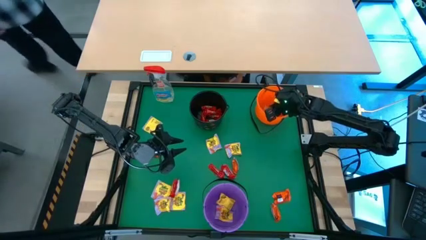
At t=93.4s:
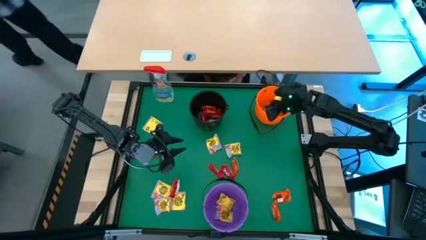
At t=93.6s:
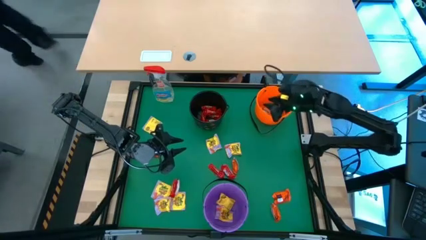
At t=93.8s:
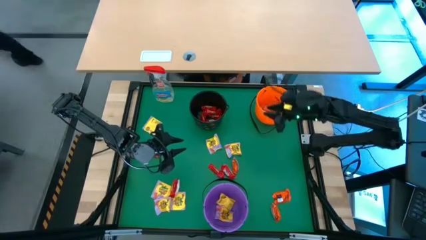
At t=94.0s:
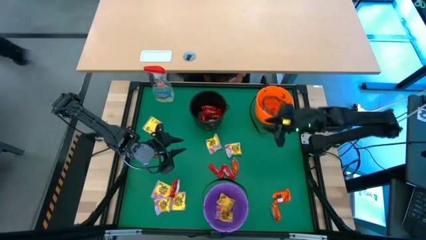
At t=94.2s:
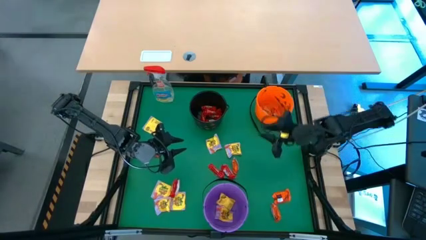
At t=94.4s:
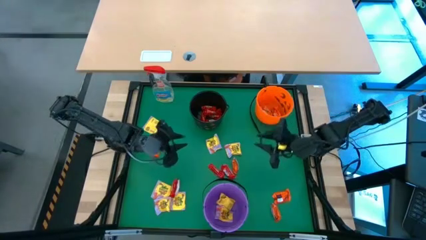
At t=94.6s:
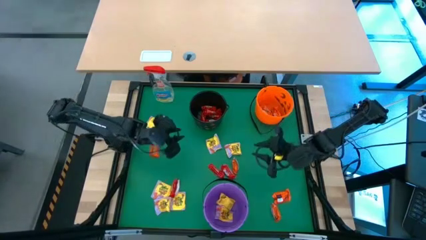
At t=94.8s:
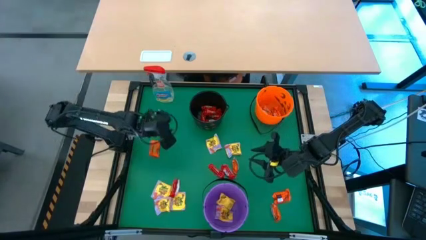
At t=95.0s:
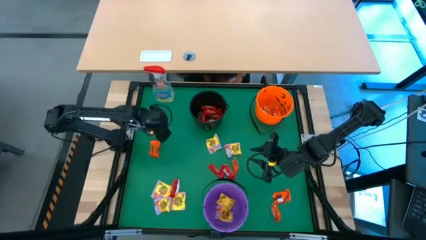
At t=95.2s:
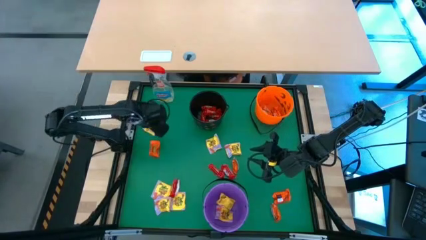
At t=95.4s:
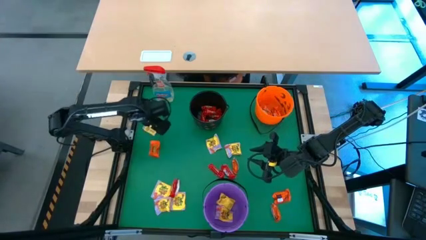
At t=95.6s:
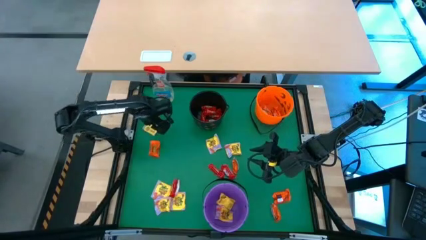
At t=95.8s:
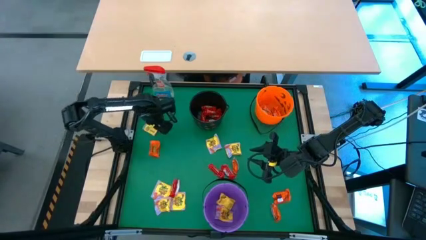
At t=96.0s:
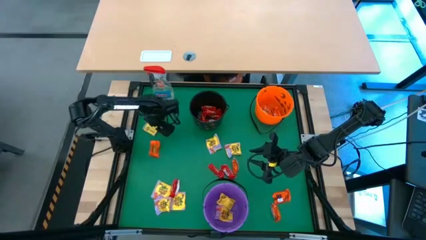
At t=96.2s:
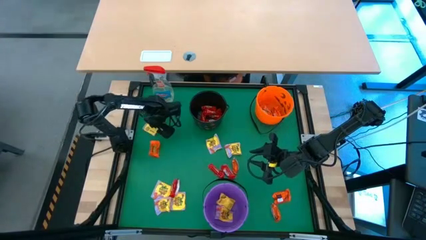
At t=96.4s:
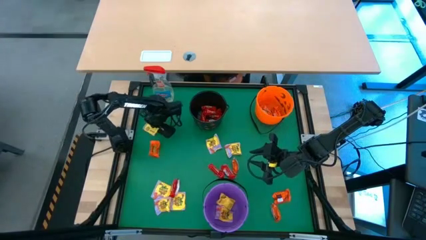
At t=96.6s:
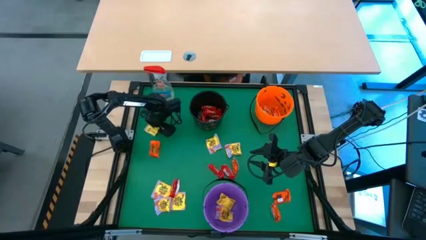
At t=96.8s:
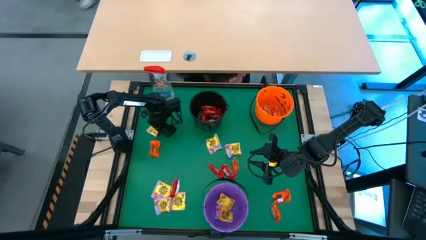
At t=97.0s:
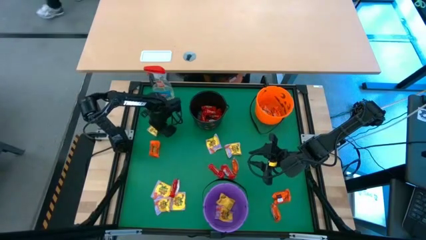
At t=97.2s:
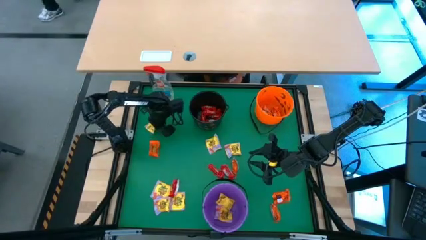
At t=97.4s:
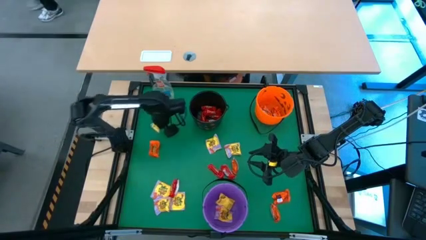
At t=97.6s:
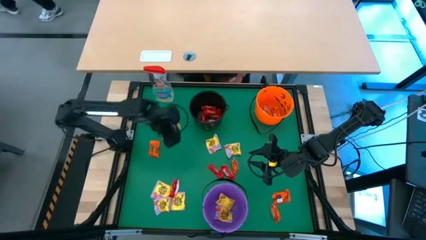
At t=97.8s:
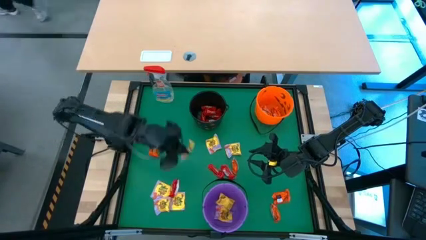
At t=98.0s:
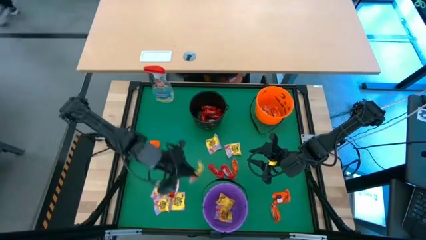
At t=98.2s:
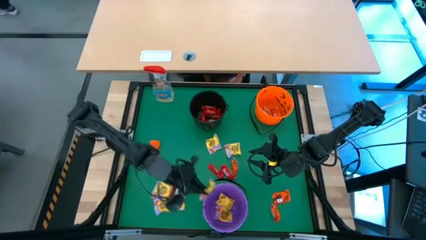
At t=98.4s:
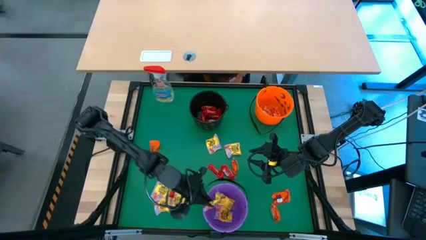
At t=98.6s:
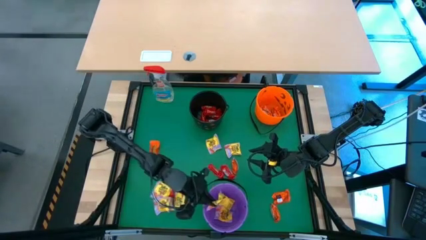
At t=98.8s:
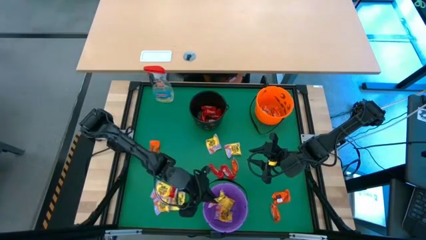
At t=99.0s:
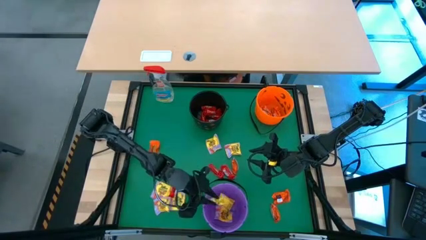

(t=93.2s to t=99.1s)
Task: Sort candy
Put the yellow candy into the violet bucket

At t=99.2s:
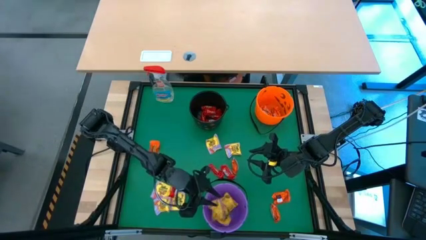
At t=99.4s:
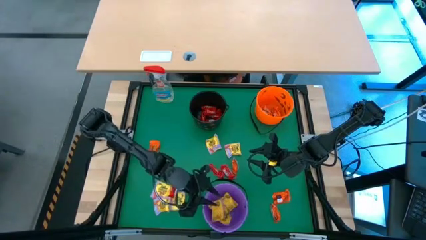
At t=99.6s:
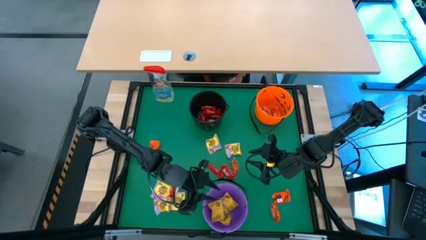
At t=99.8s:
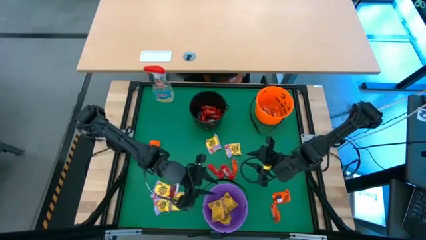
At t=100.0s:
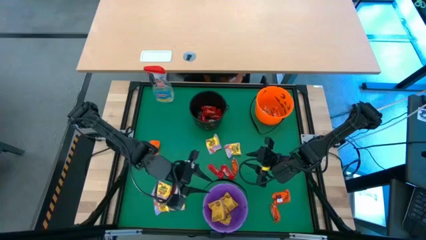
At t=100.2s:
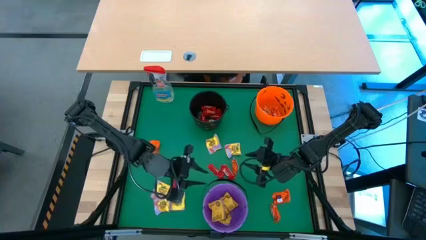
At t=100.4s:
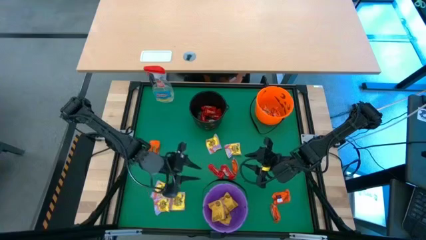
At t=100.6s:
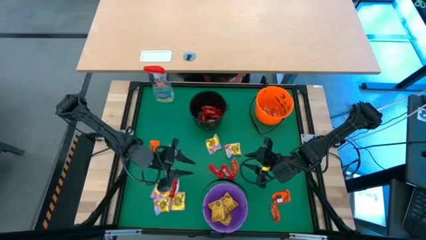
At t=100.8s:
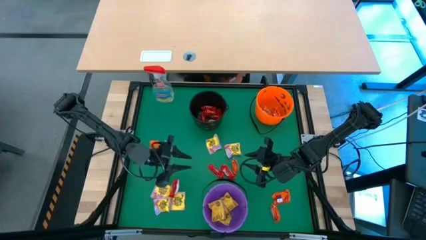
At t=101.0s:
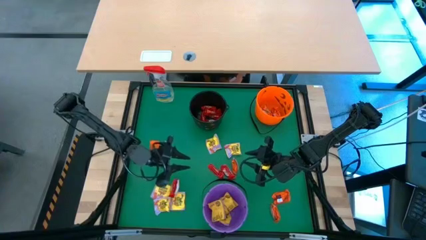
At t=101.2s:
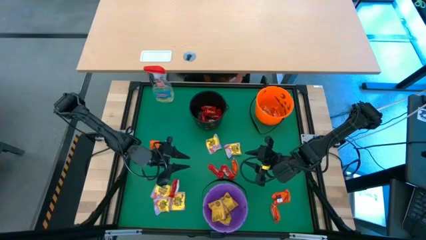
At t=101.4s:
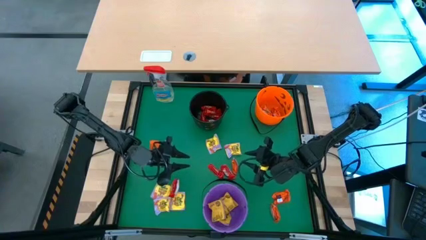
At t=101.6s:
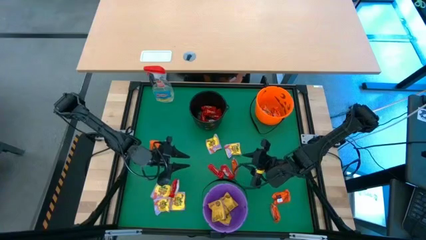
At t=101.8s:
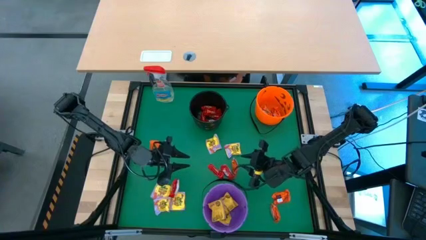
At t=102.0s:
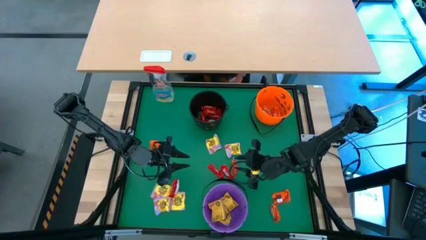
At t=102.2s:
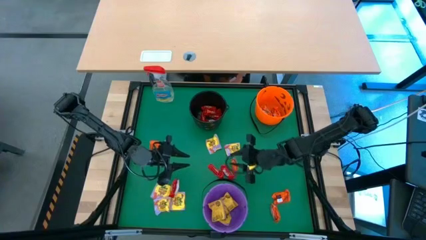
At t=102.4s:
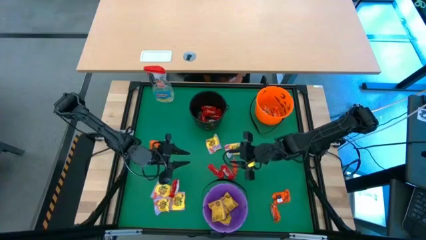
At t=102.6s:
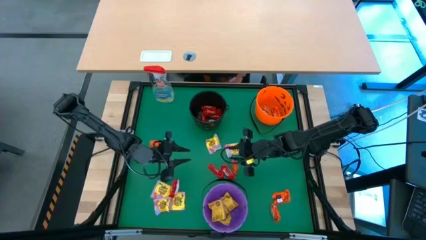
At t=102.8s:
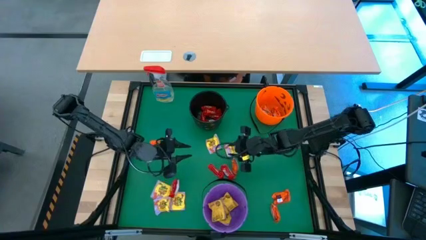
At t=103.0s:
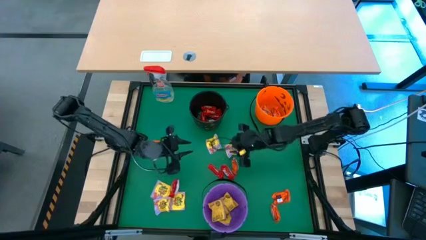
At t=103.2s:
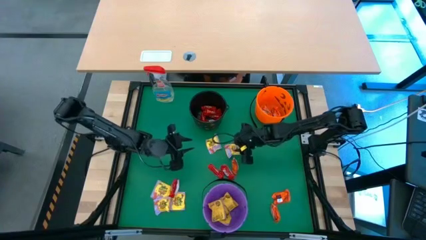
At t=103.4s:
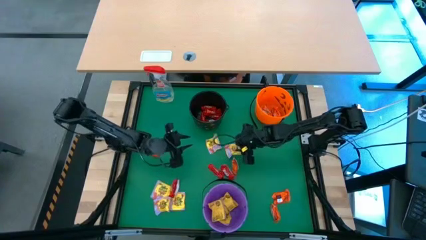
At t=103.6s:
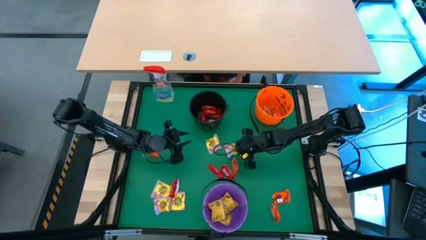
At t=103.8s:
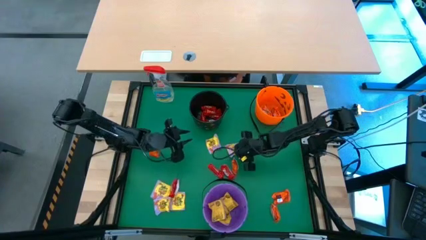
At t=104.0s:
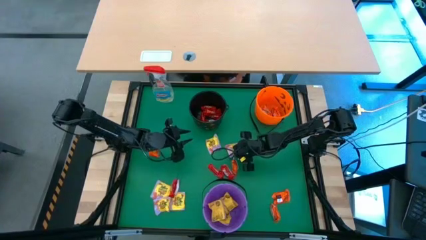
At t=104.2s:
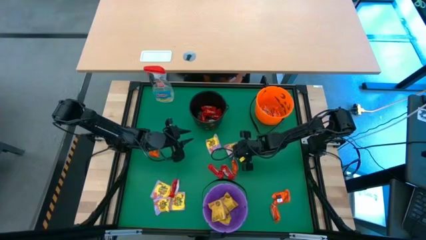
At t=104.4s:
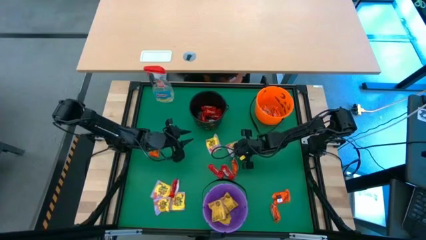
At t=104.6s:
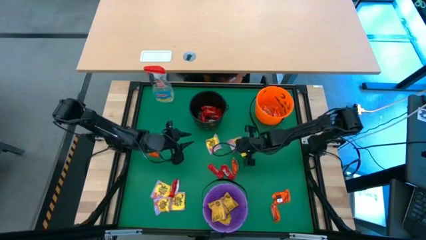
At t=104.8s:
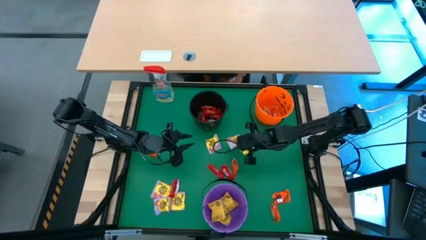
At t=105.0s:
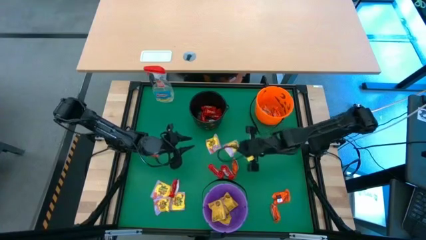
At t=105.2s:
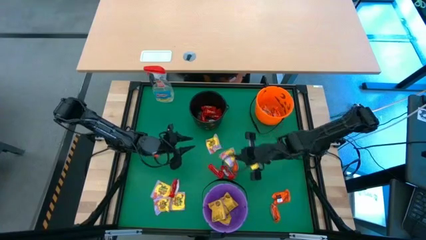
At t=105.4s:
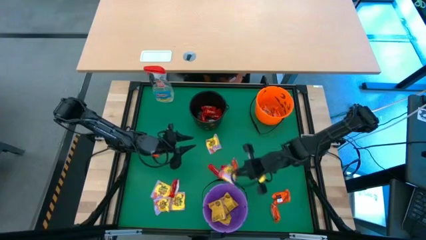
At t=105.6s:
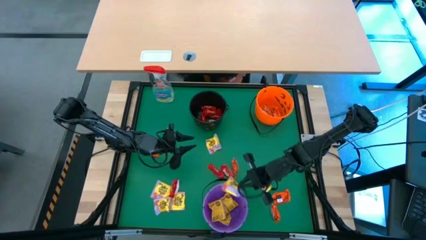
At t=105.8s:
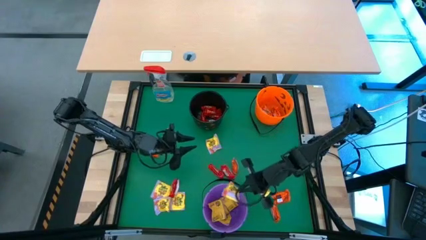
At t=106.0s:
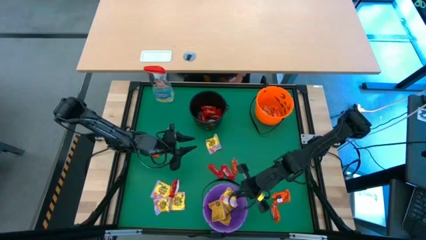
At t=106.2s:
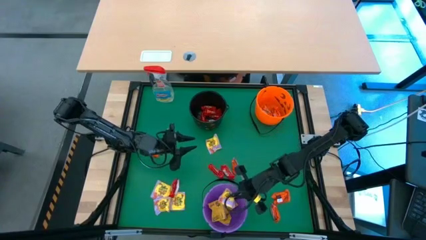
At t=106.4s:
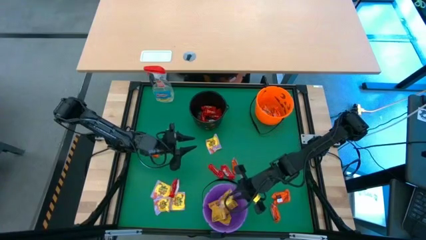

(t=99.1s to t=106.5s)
Put the yellow candy into the violet bucket

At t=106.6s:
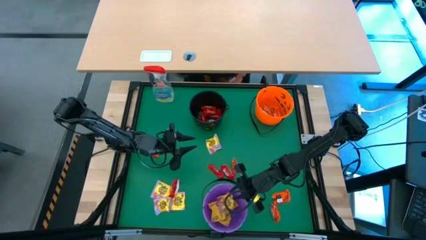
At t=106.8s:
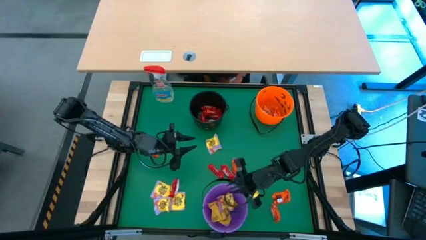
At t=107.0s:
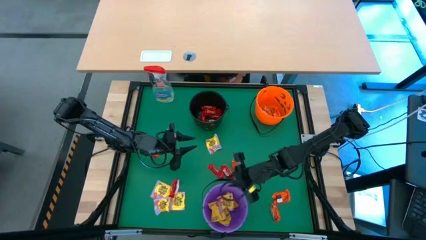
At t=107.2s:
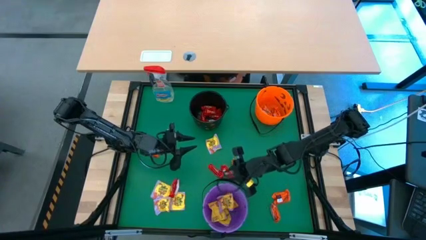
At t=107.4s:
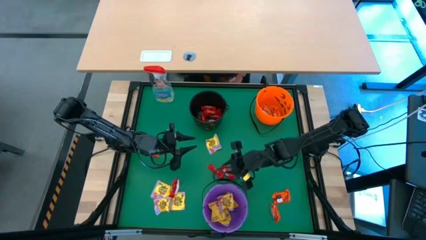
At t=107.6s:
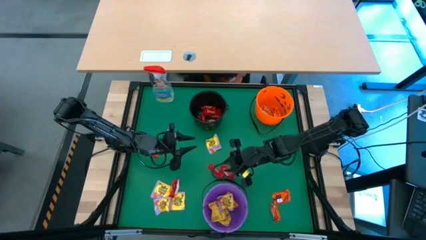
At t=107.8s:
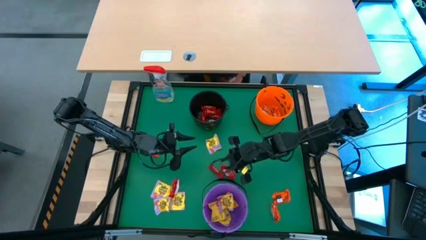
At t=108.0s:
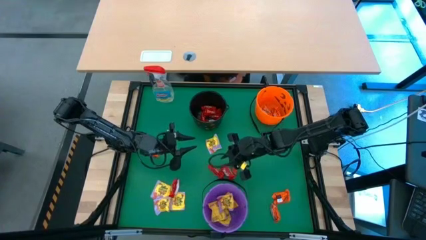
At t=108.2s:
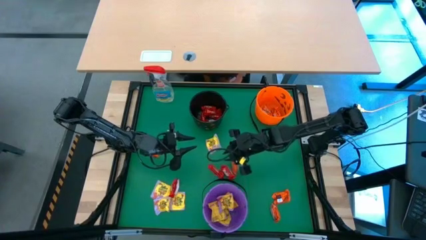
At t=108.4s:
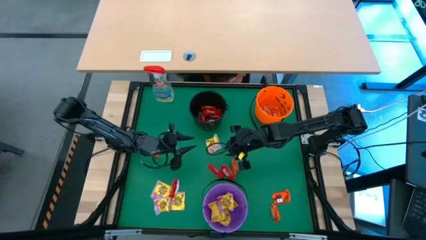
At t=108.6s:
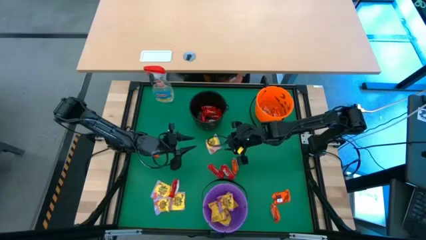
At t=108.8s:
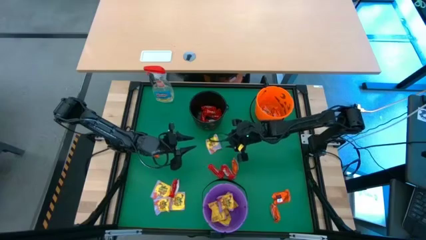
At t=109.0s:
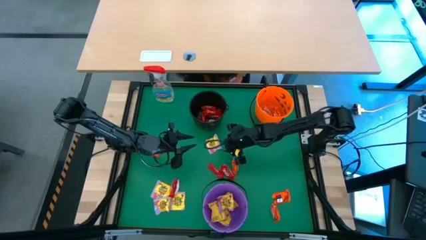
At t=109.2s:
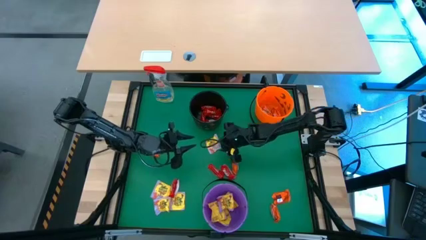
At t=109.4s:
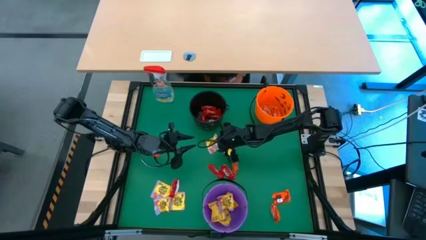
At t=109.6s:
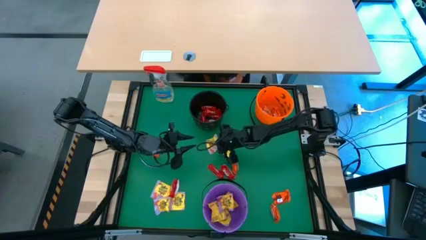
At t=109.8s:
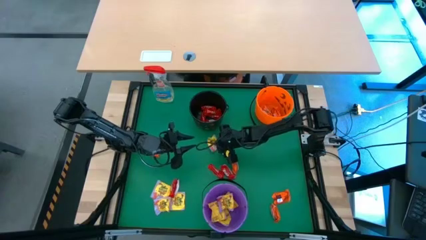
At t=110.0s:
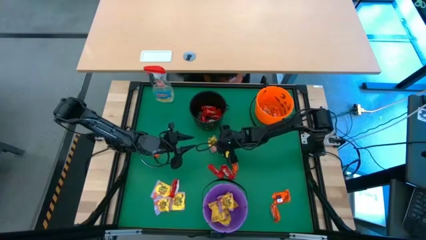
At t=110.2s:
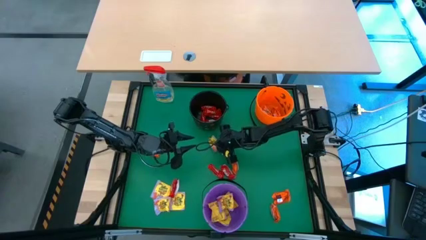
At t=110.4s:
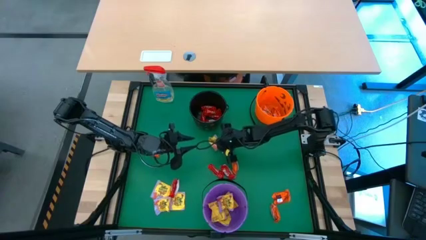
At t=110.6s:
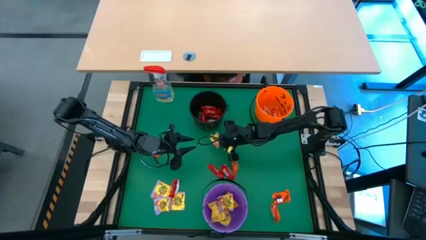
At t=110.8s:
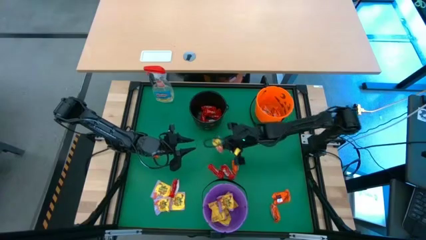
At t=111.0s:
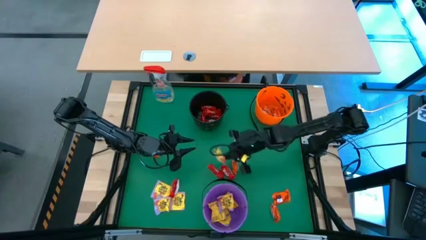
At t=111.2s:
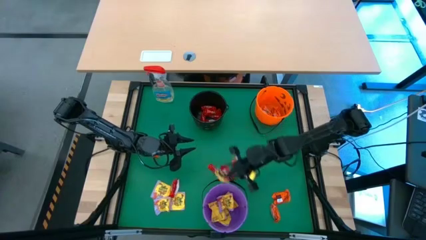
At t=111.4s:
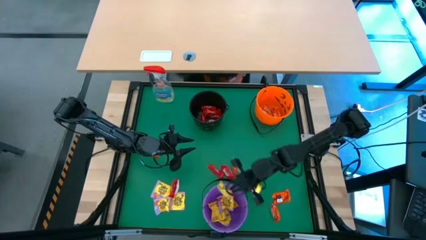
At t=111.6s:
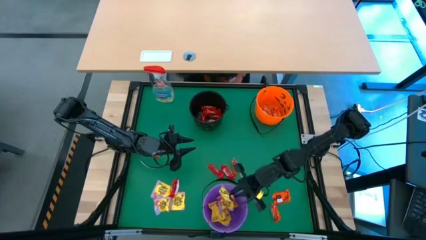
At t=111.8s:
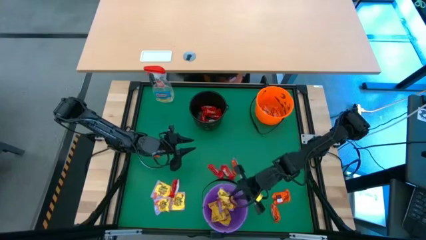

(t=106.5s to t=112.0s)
Put the yellow candy into the violet bucket
